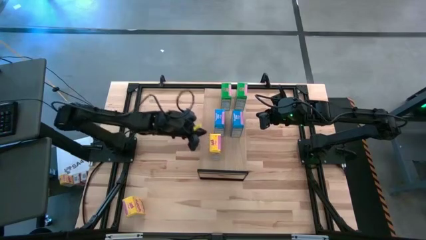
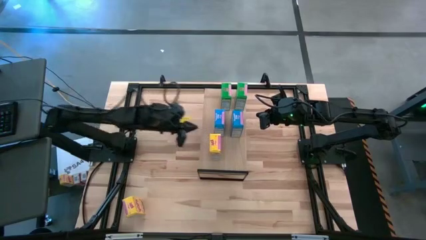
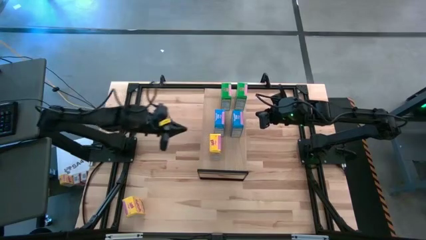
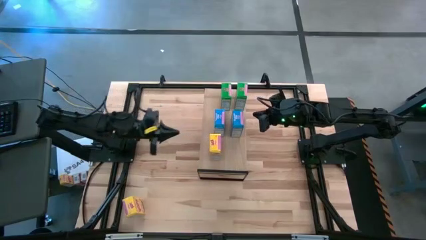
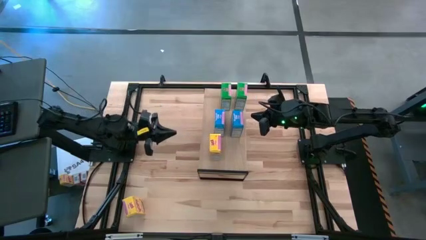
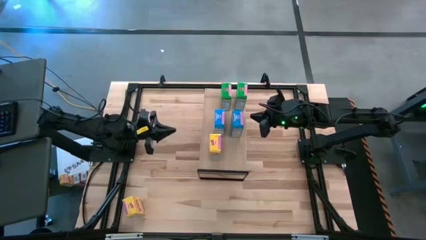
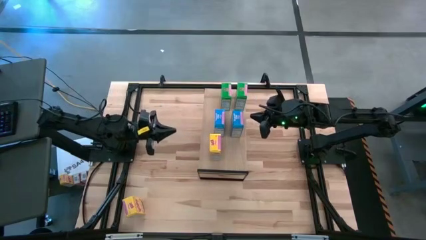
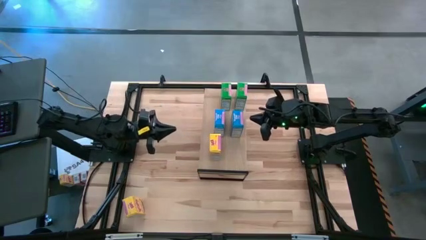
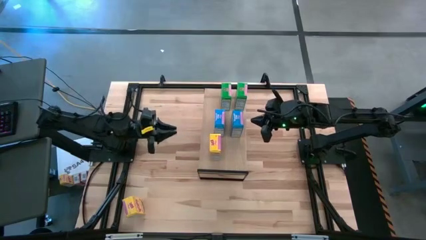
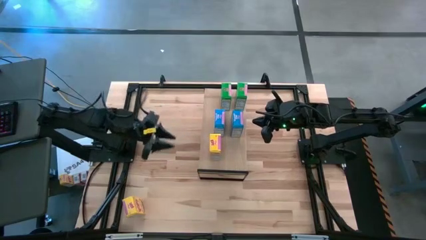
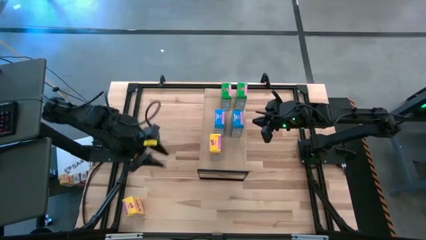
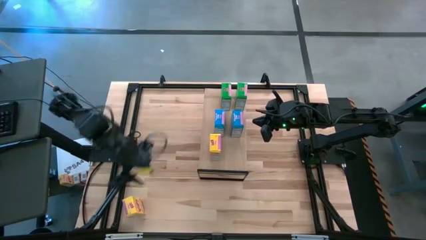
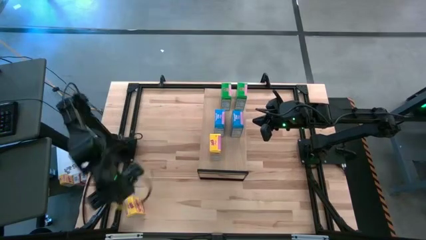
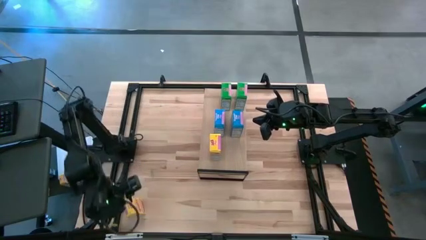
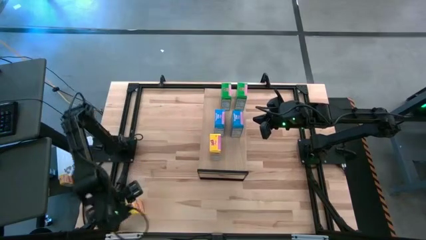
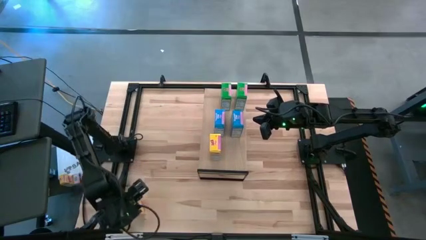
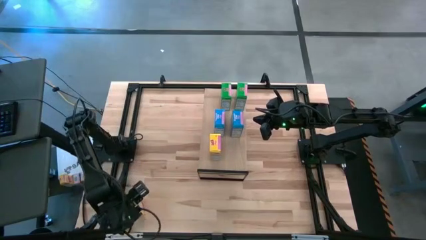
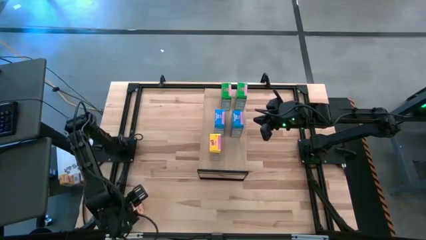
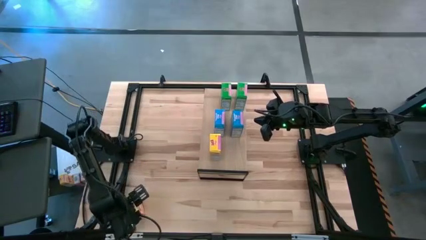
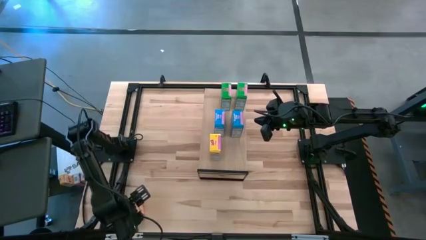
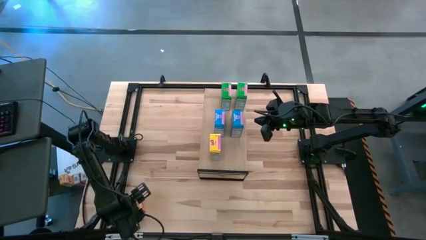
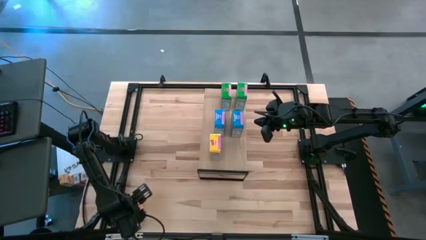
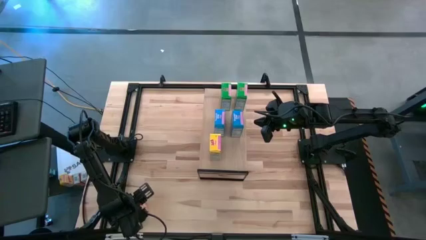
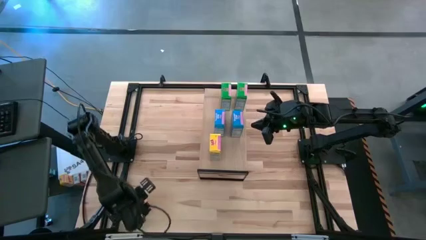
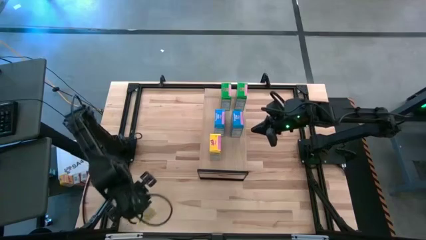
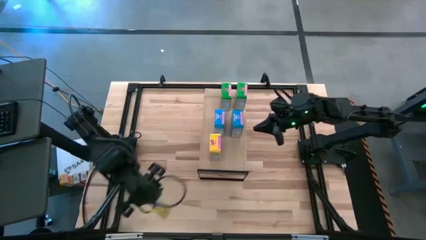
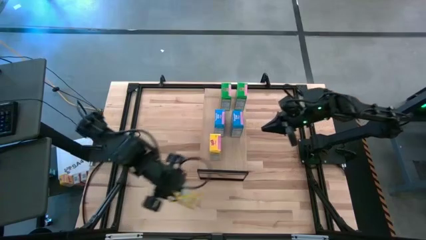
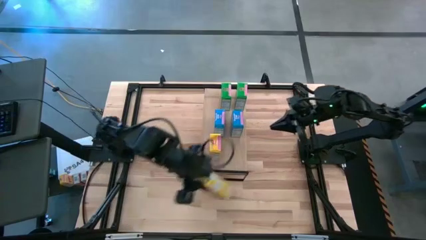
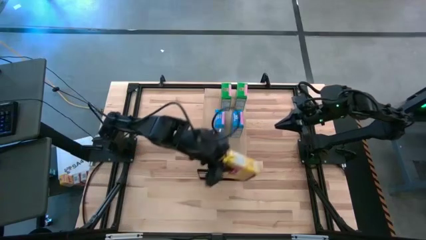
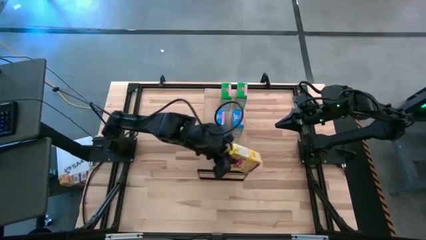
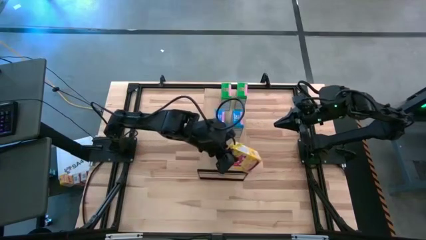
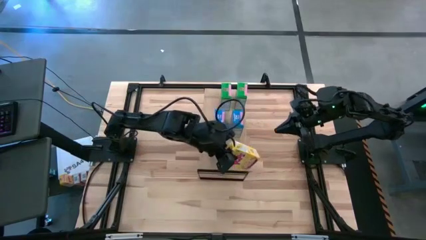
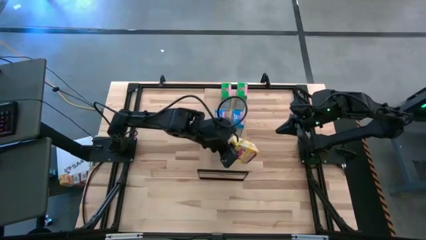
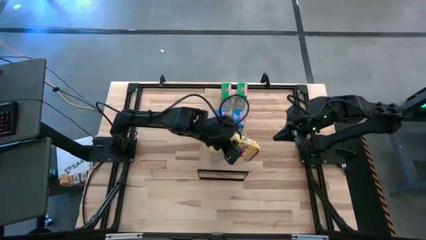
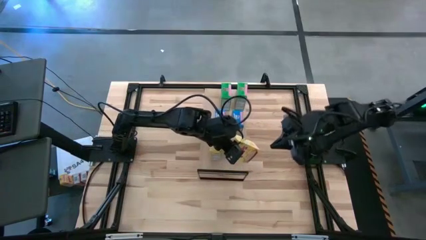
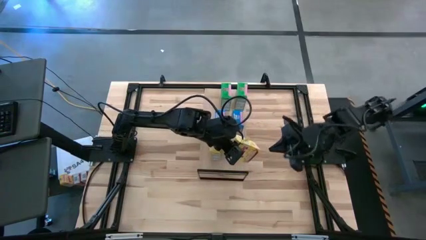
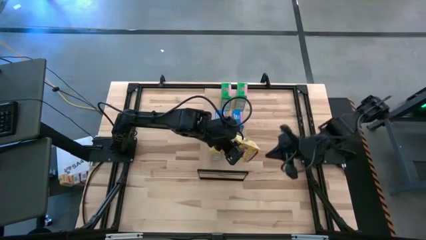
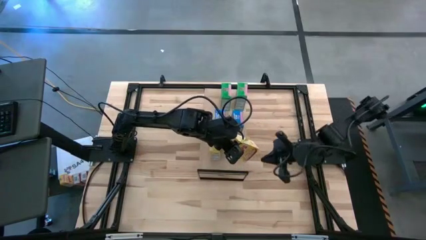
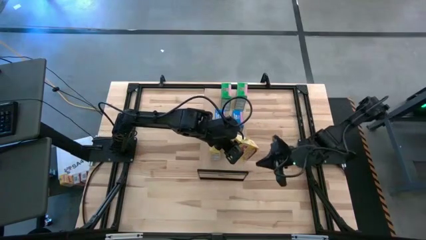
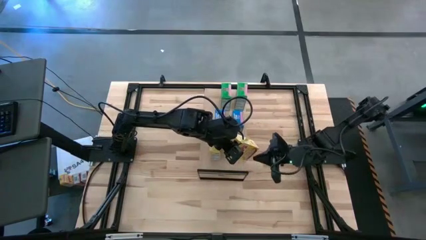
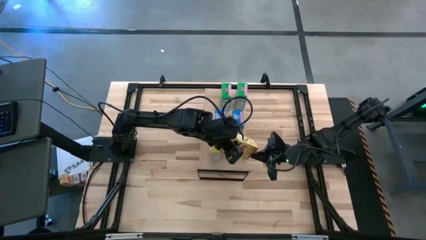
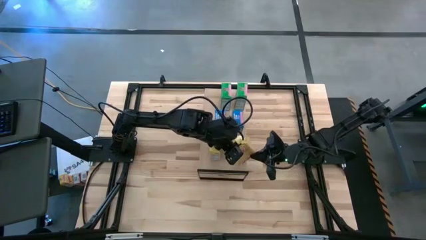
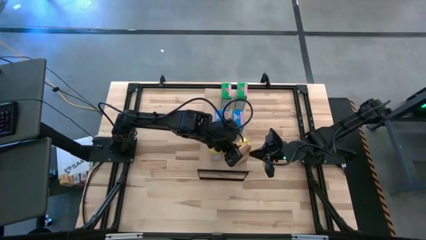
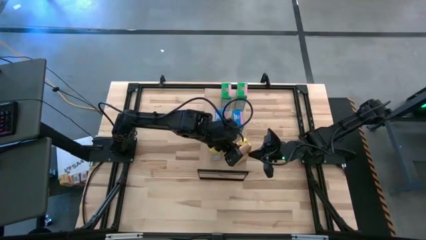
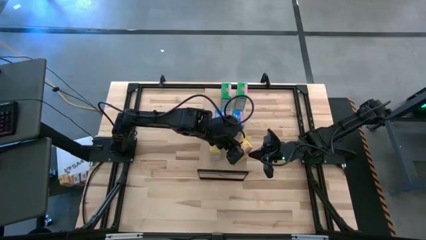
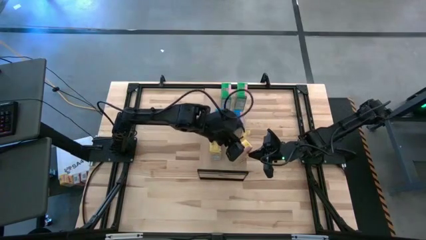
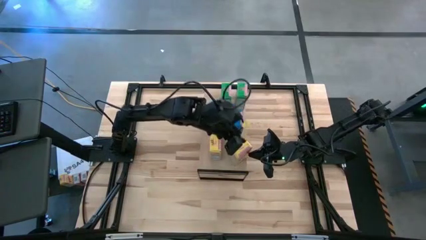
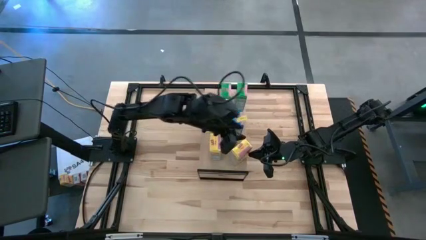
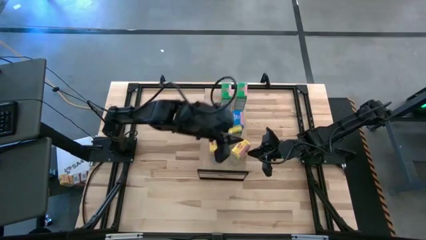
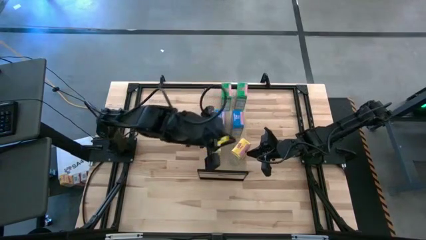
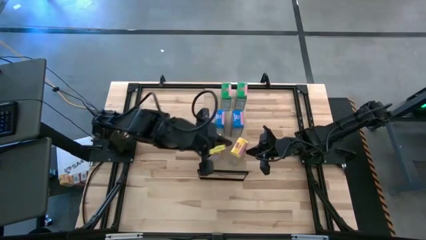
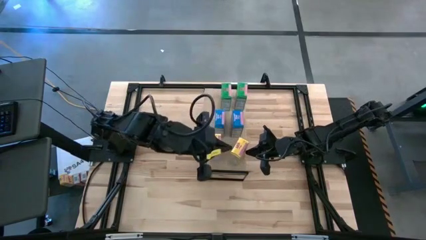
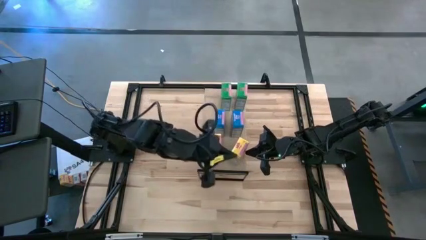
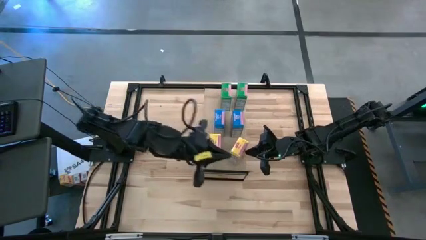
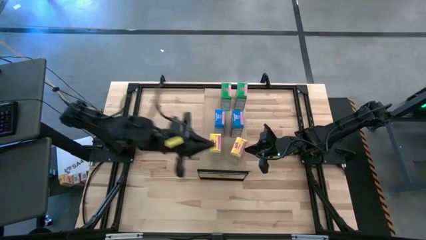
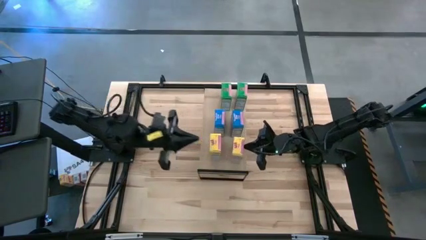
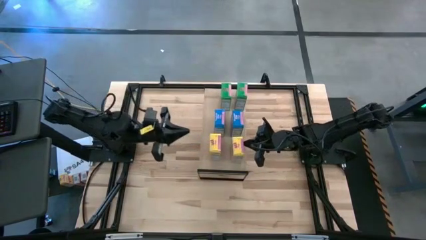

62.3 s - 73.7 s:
Task: Stack cereal on shelf
Put the yellow cereal box on the shelf

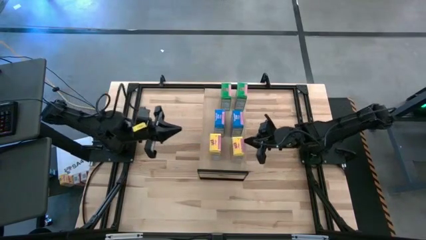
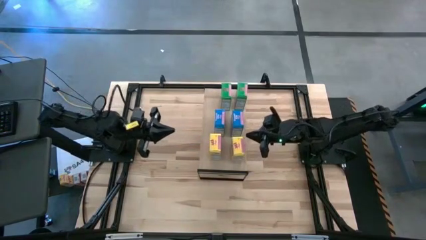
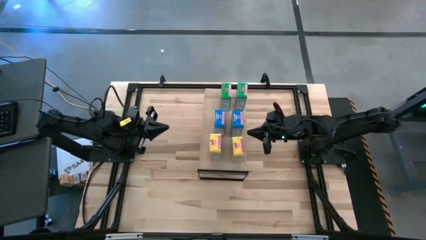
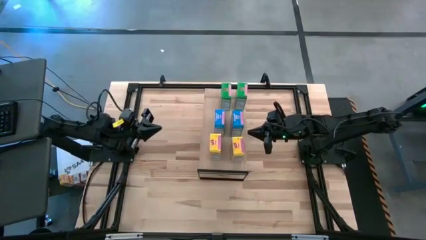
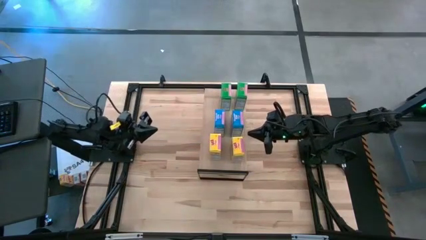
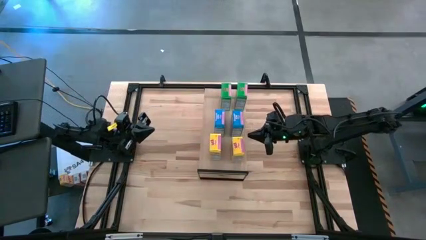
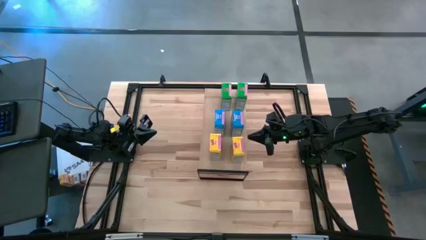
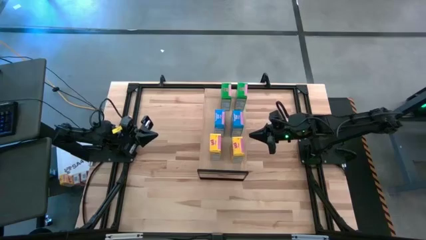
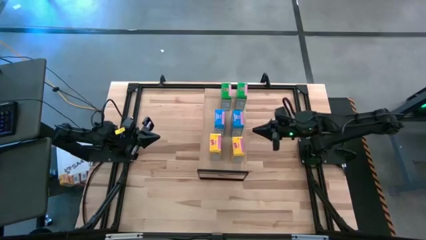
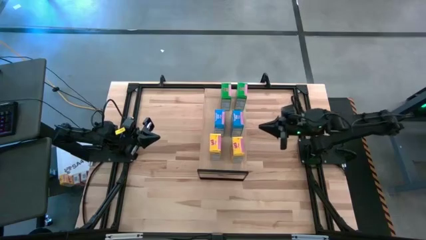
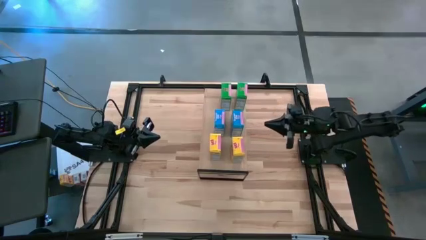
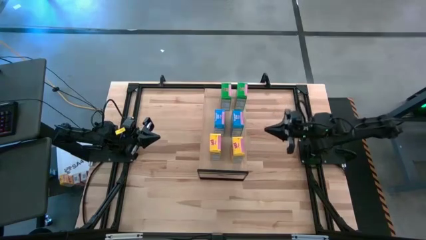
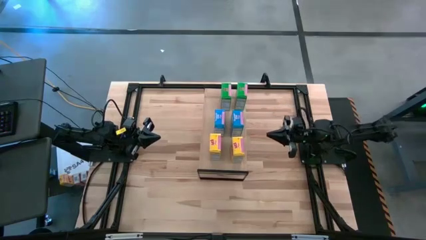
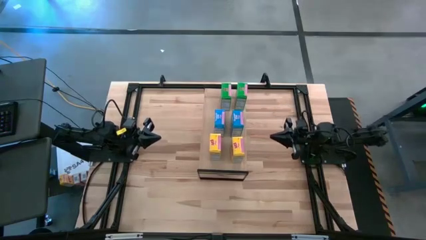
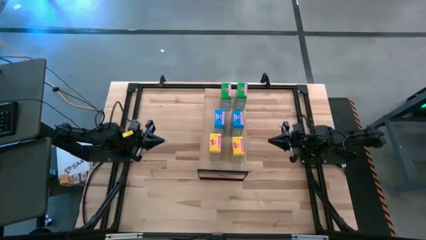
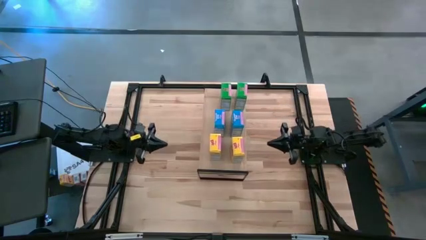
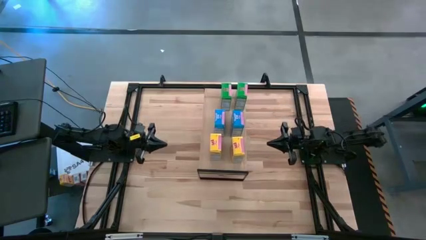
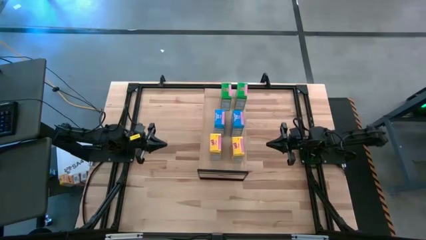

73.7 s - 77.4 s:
Return to Home Position
